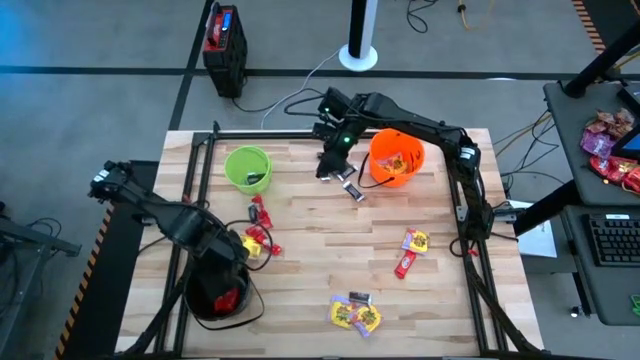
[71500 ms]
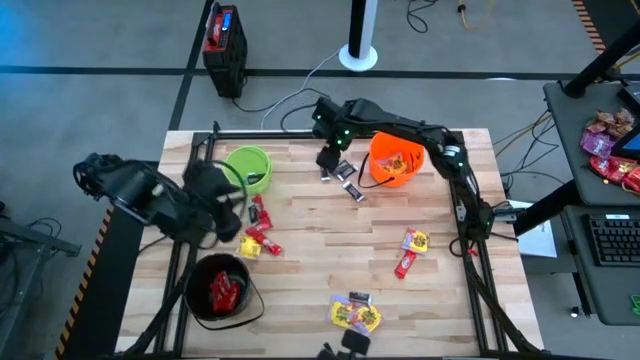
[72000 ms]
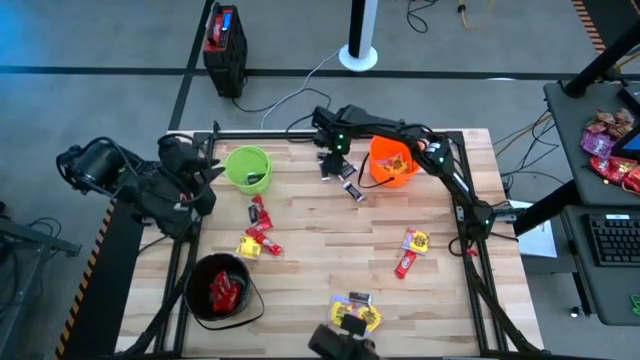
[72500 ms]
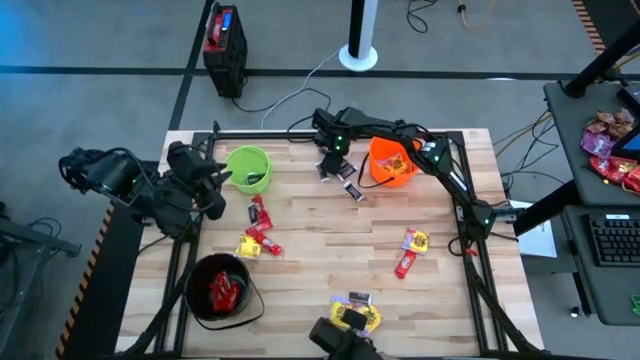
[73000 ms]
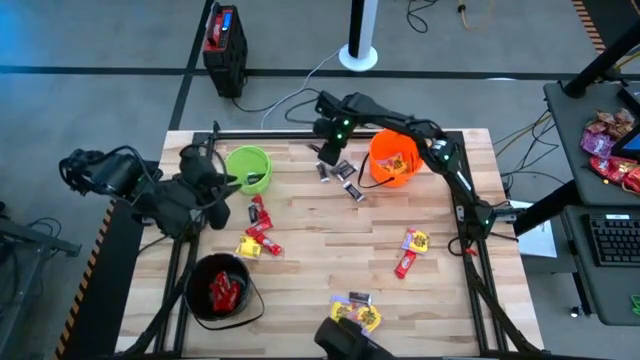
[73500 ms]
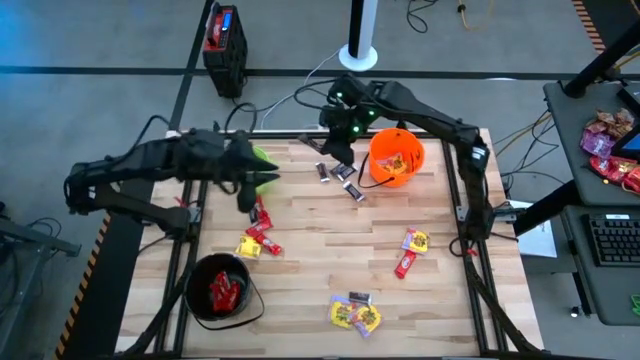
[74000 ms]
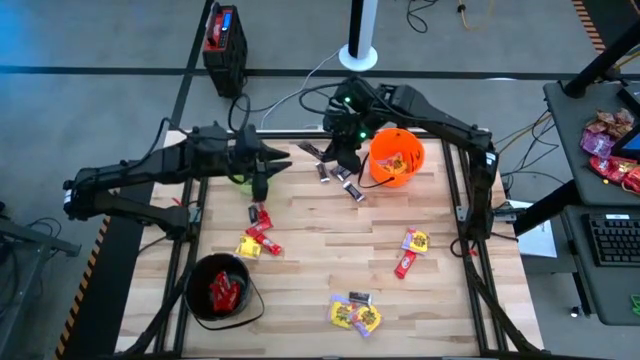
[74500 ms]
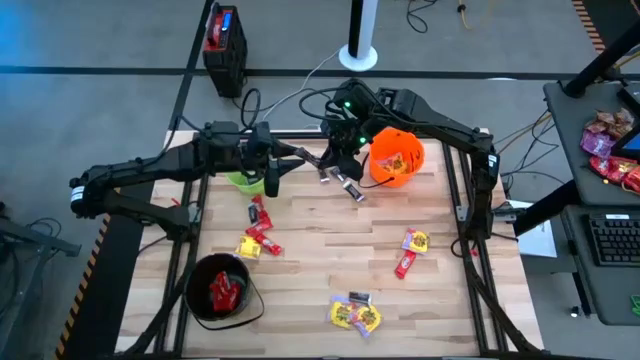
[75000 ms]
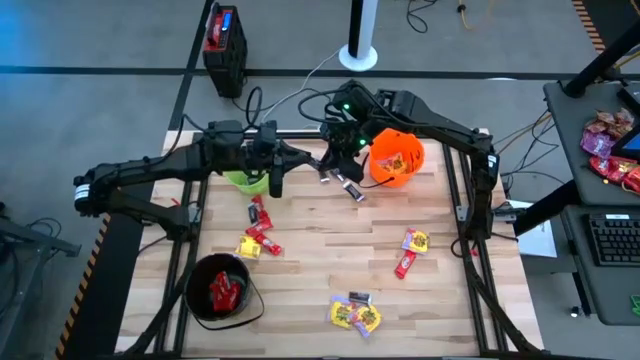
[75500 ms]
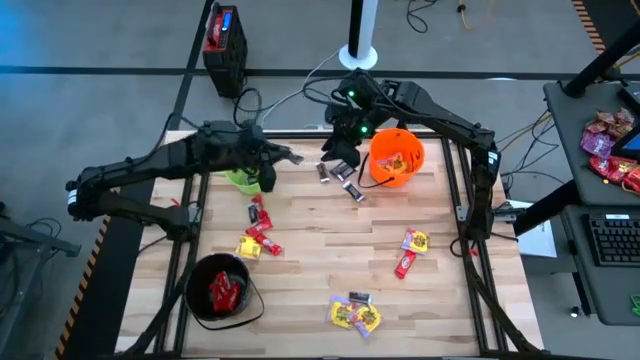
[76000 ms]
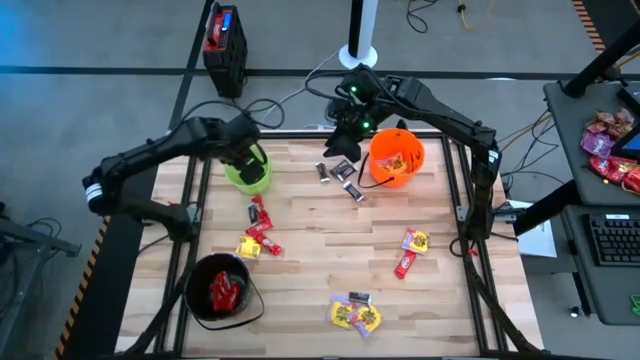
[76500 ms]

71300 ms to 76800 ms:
Task: Sort candy by brand, put in halloween buckets
Put the brown candy into the green bucket

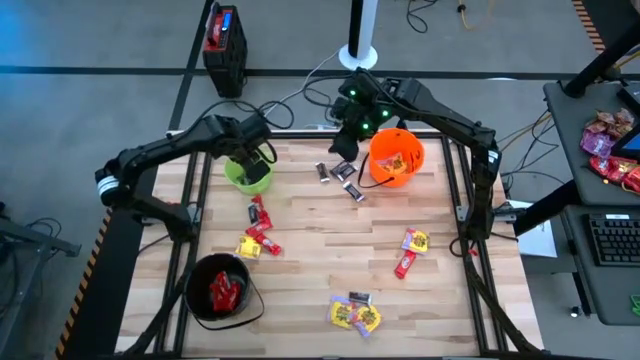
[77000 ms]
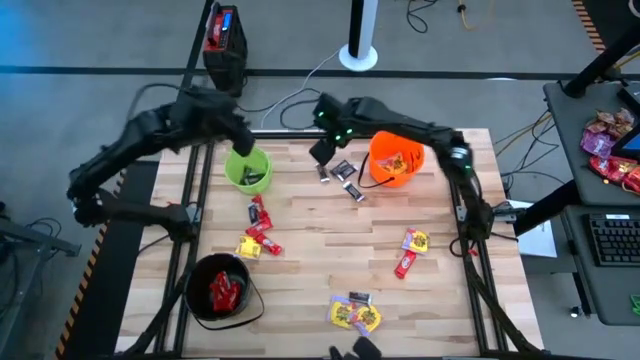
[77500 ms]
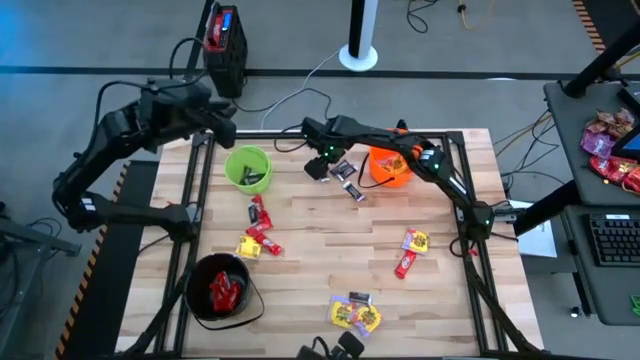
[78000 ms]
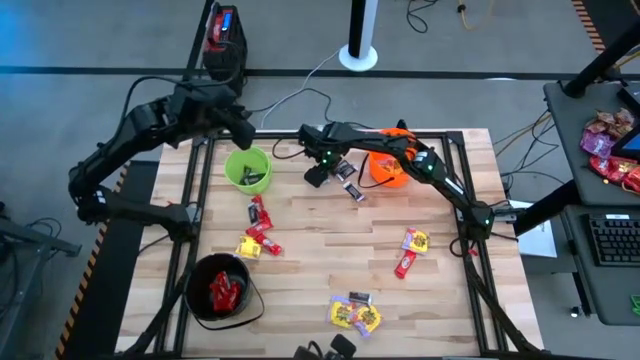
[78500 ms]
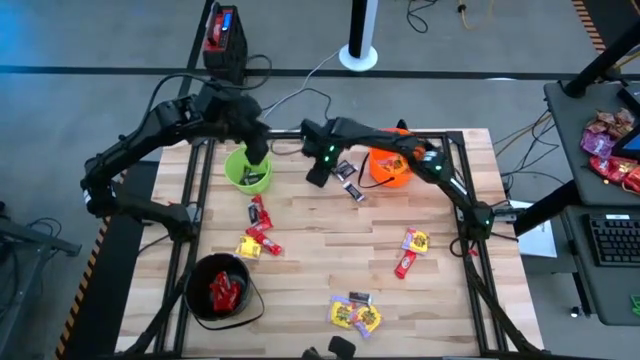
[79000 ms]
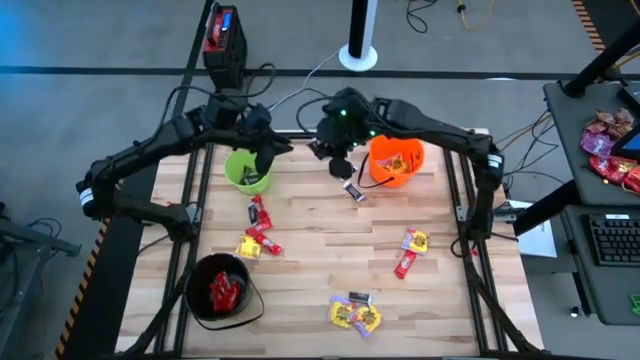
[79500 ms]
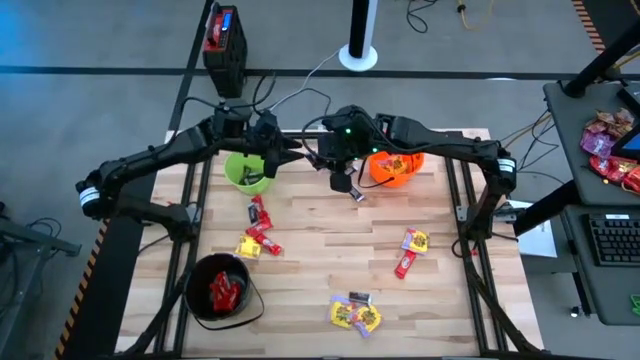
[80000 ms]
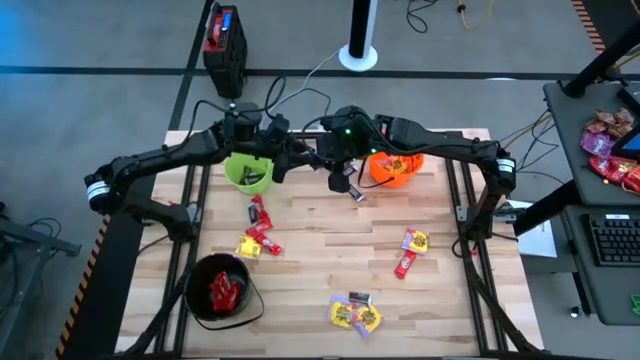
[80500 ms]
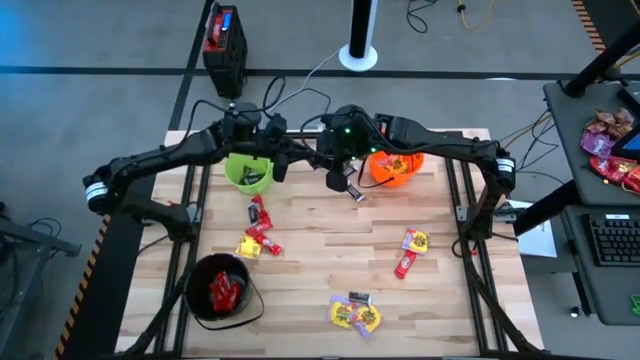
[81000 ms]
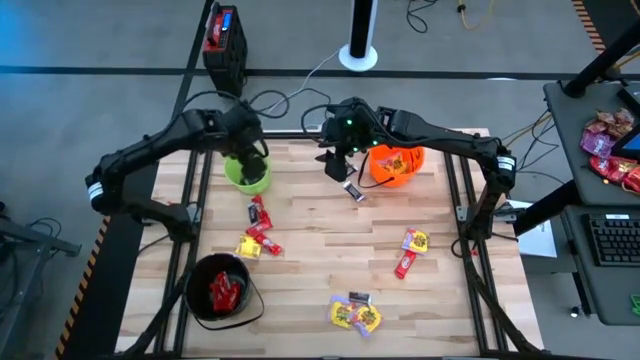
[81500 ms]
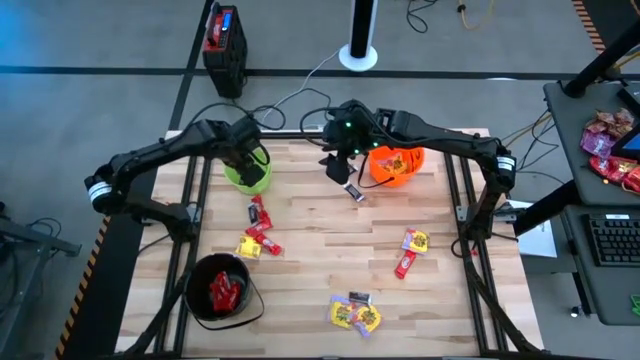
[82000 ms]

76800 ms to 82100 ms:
Put the brown candy into the green bucket

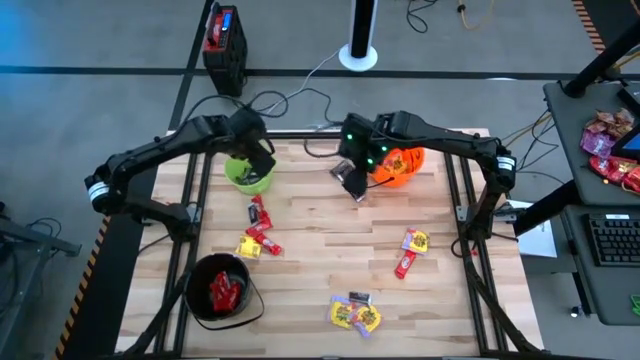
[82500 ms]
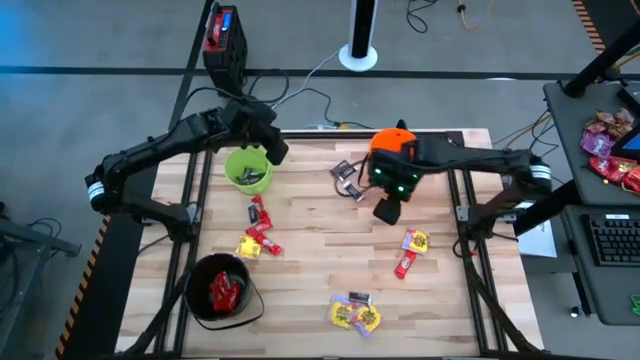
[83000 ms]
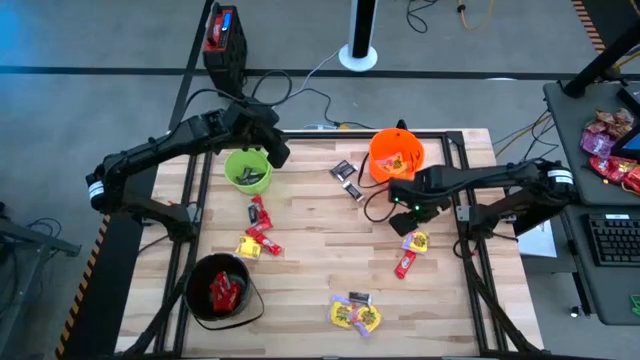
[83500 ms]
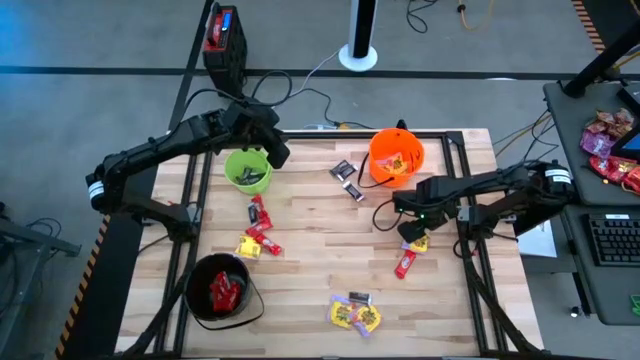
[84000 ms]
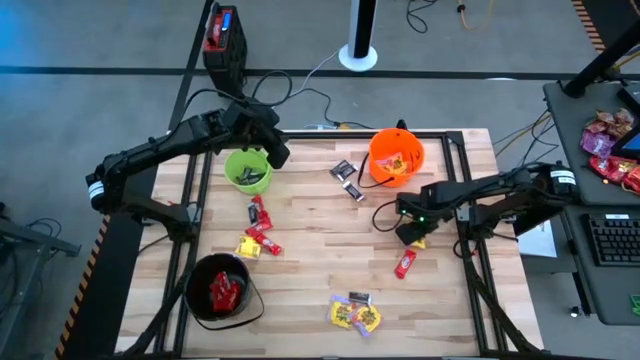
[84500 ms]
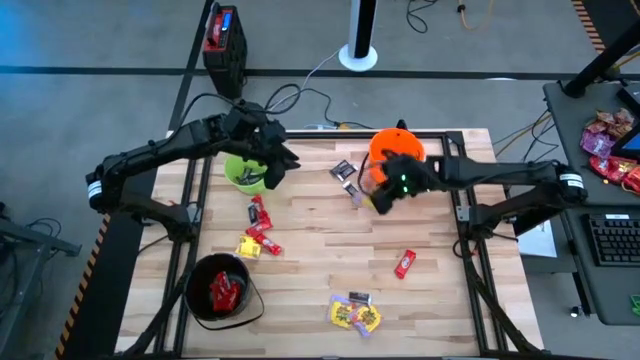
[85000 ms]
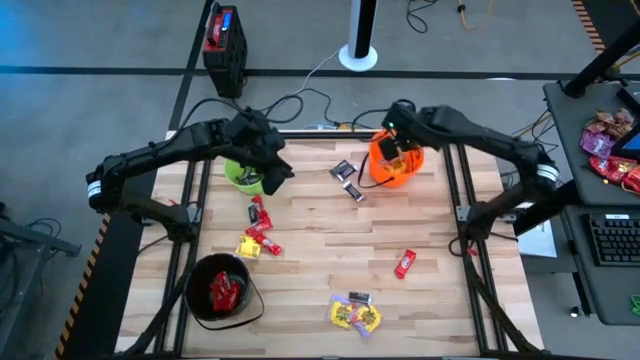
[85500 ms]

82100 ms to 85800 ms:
Put the yellow candy into the orange bucket

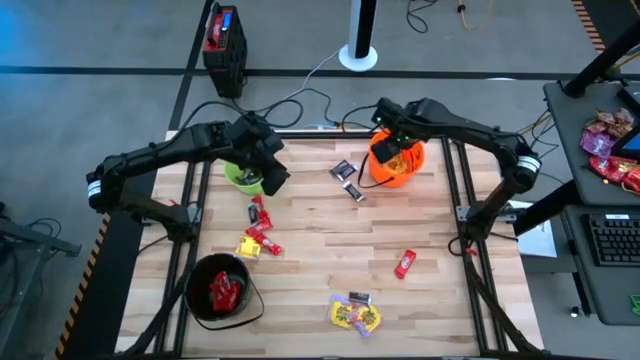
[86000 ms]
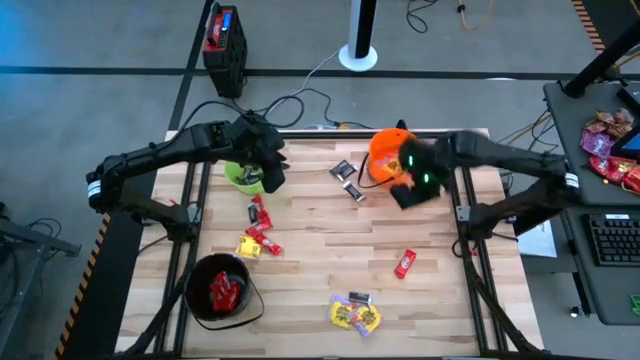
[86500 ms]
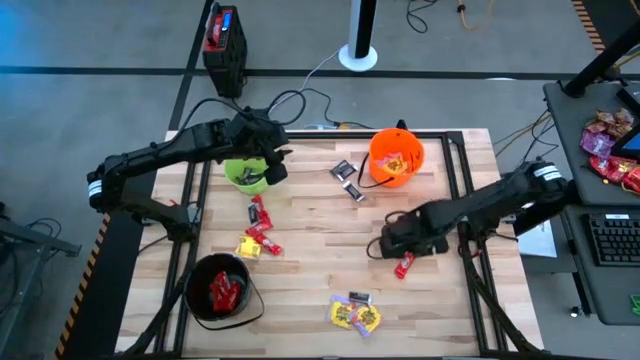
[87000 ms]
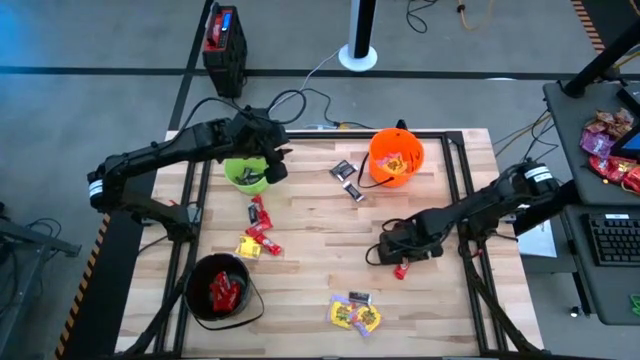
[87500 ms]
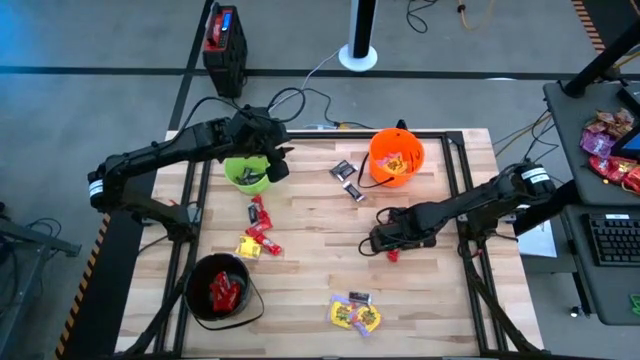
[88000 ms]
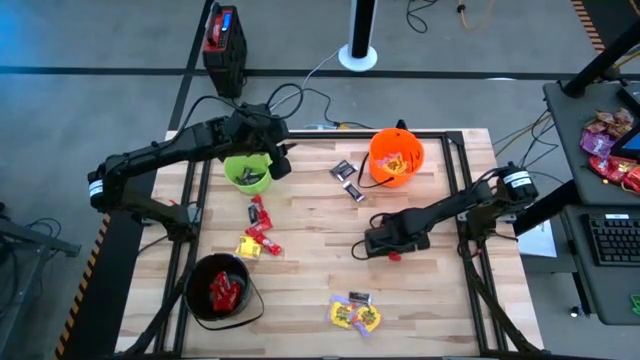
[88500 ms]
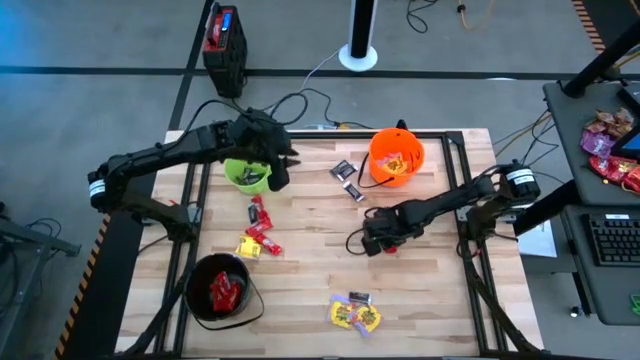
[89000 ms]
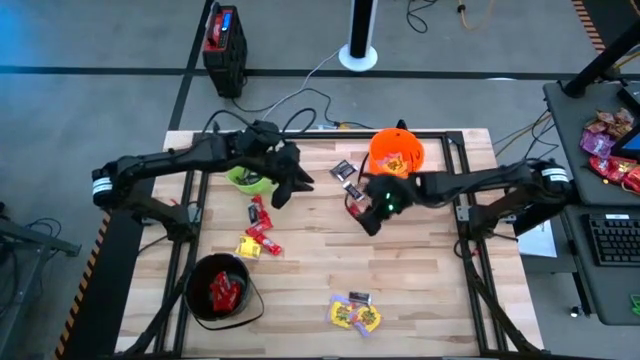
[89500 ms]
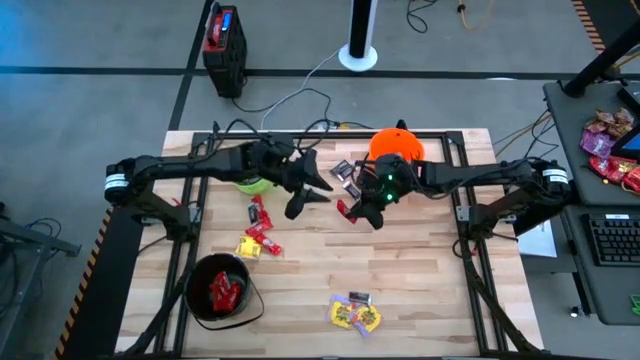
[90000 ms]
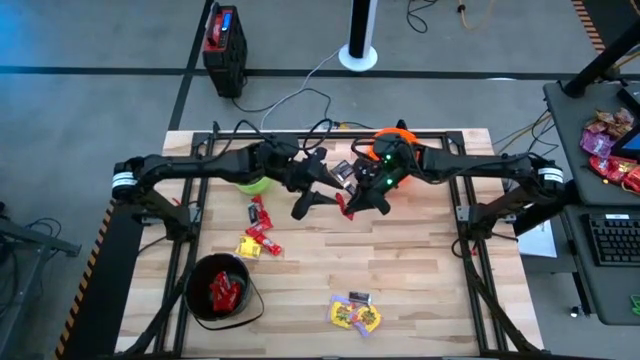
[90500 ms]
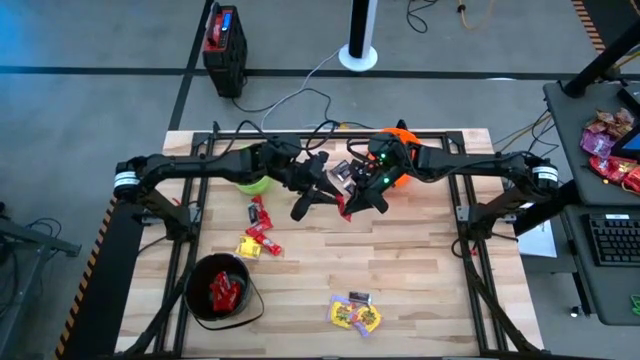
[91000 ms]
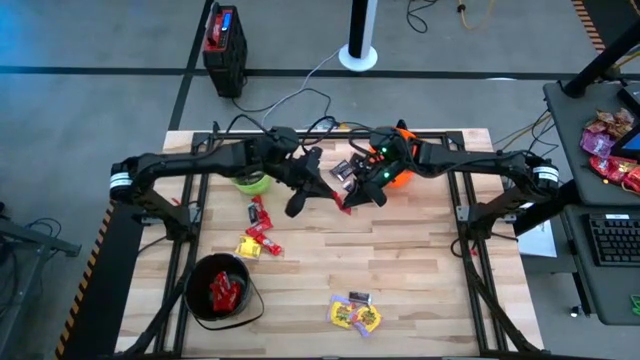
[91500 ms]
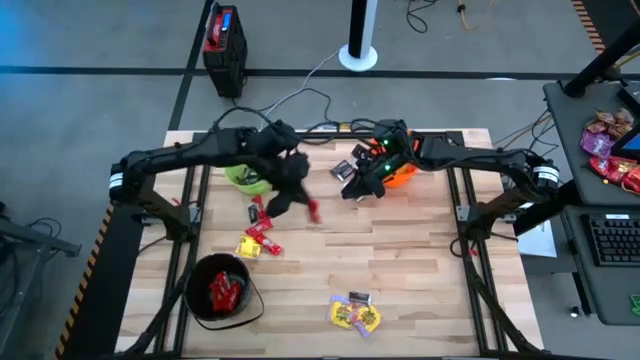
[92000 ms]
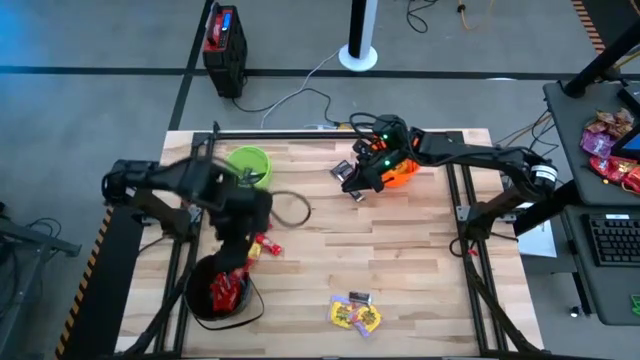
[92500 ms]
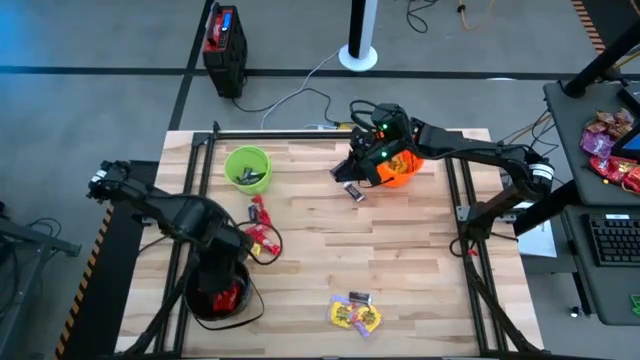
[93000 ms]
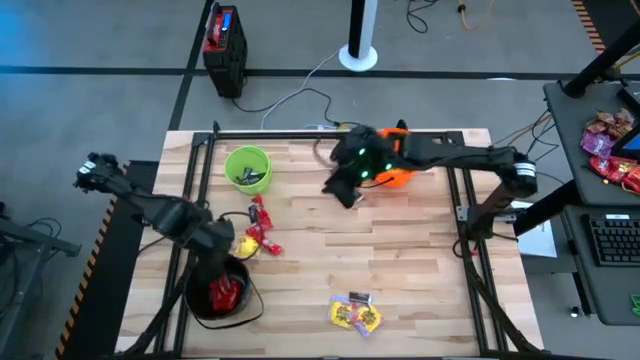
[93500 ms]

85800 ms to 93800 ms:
Put the red candy into the black bucket
